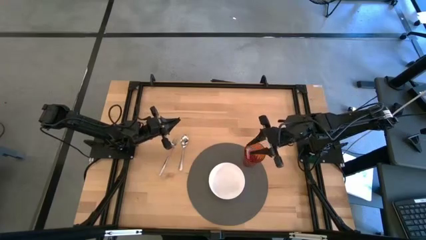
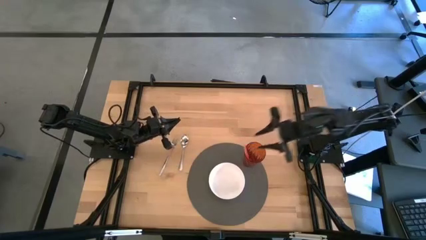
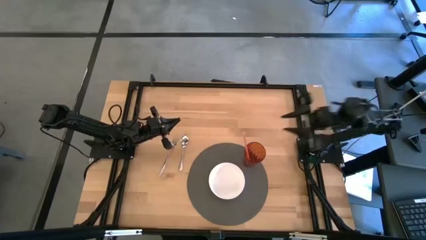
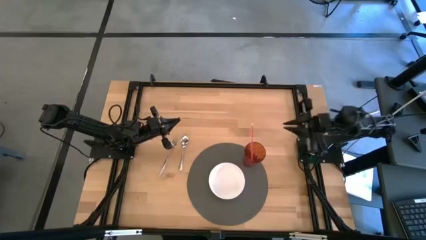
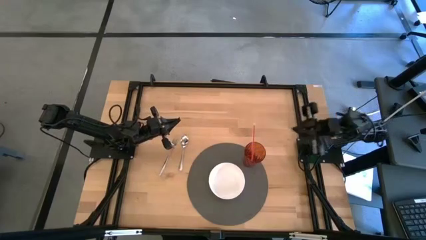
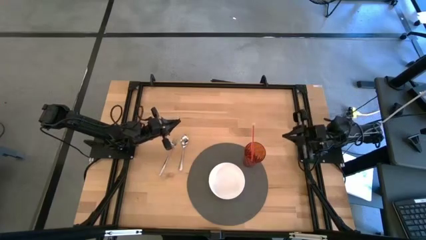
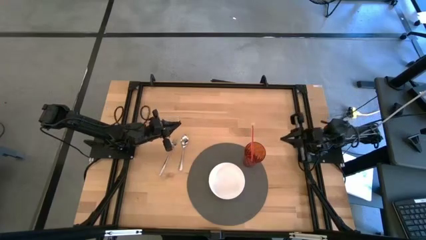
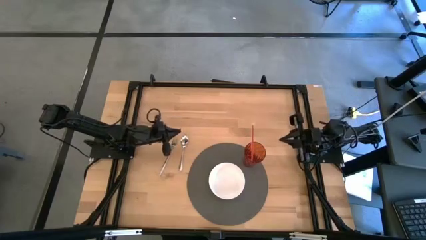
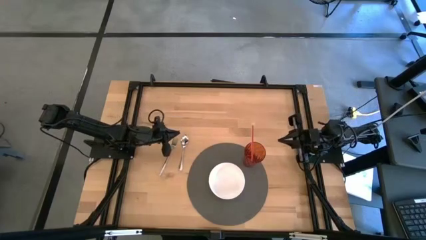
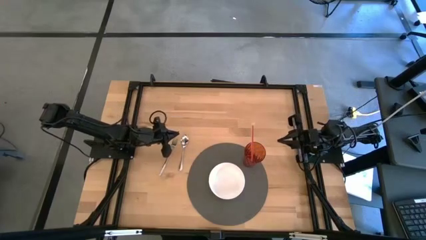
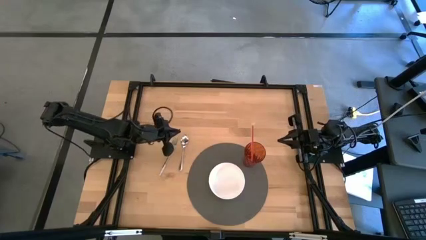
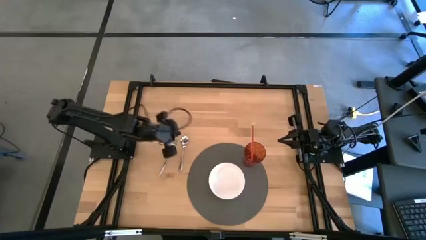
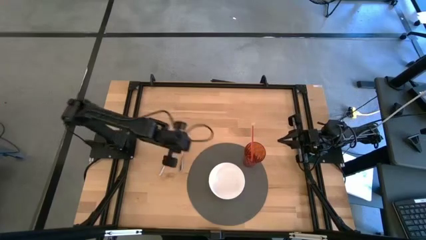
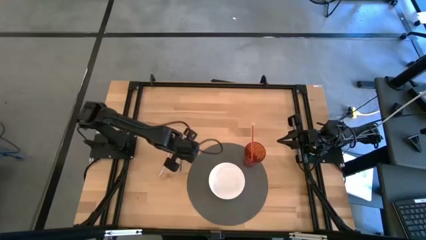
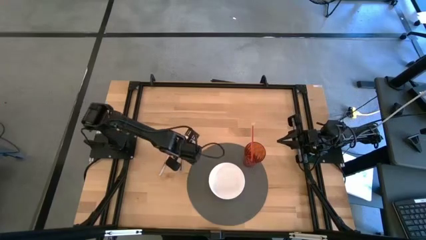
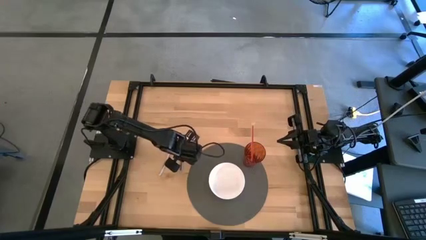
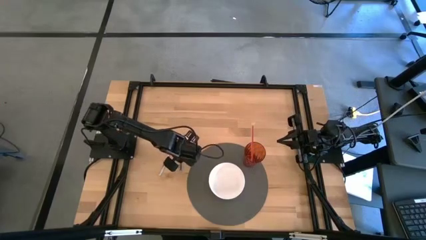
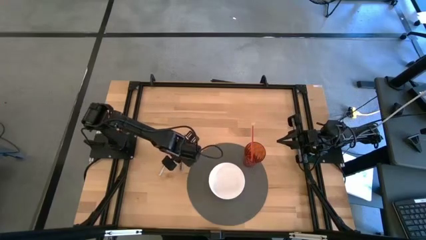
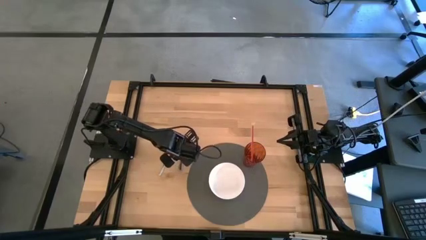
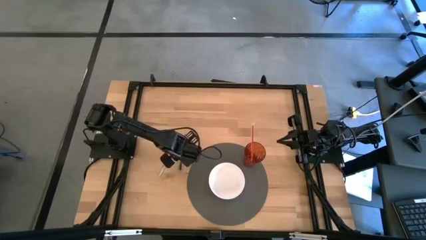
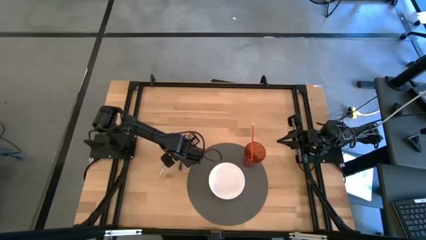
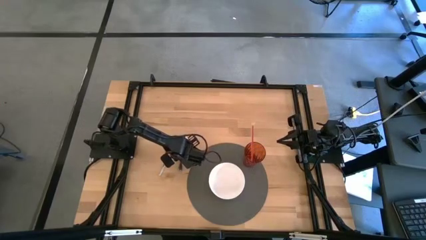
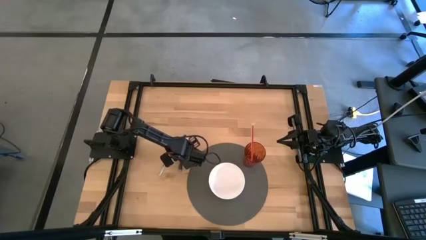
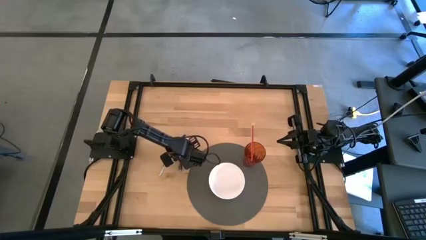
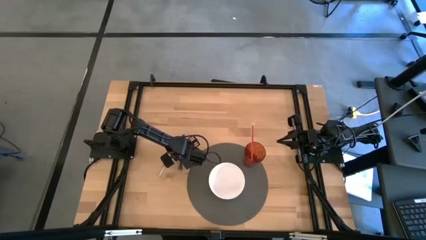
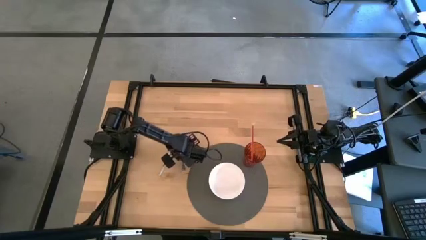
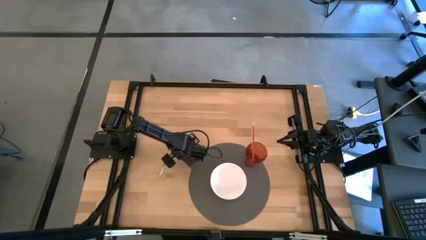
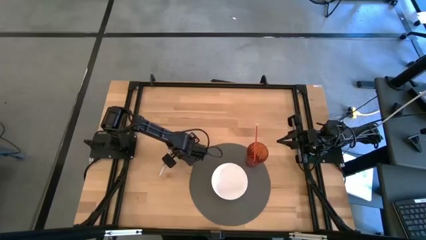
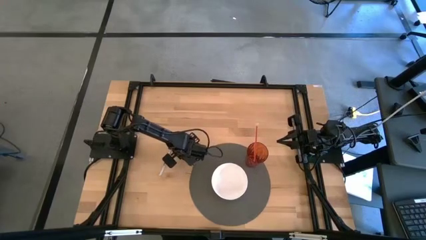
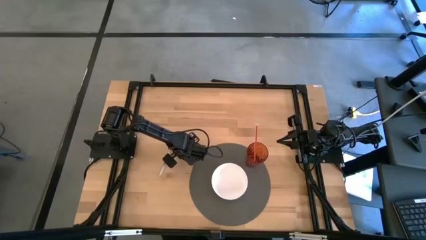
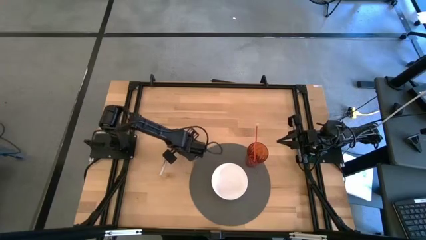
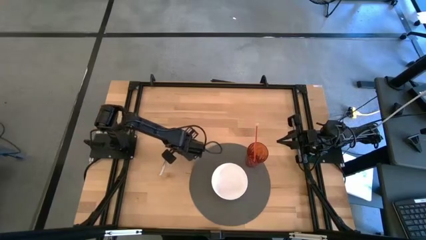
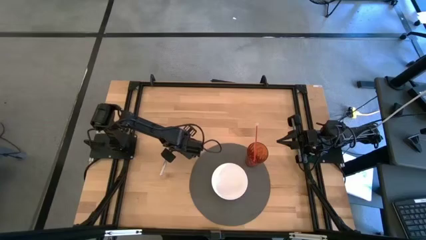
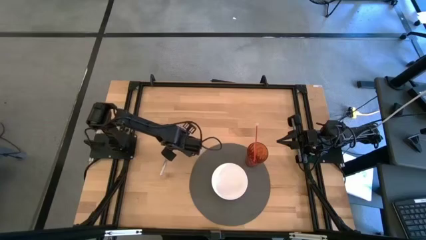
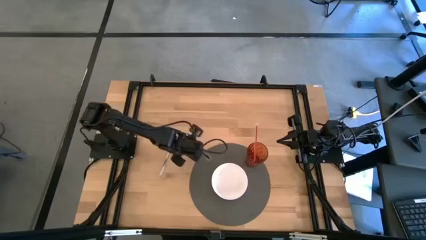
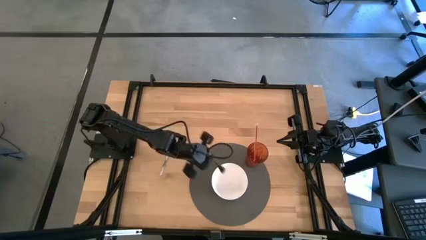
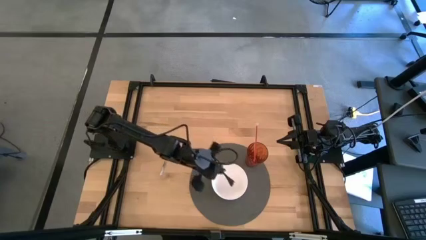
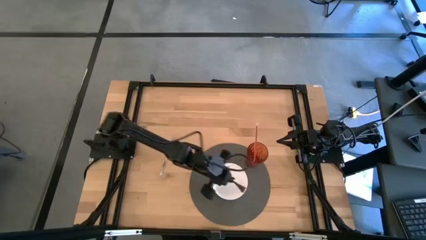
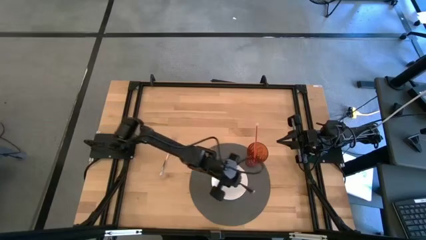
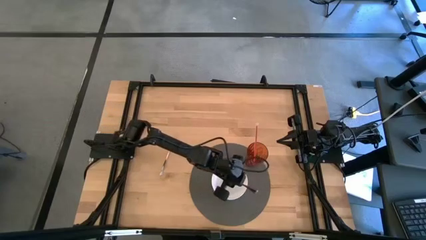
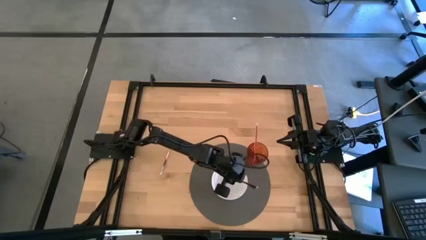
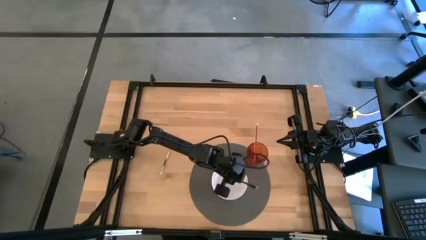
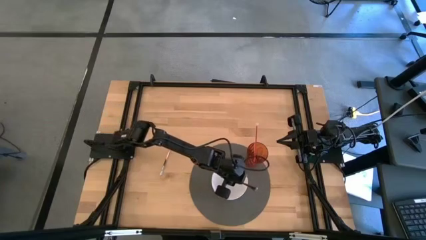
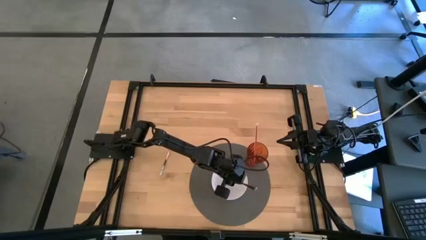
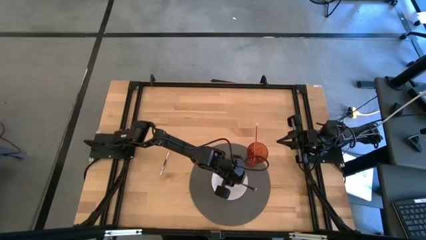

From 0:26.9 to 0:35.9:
Task: Pick & Place Utensil
Put the silver spoon into the bowl on the table mat

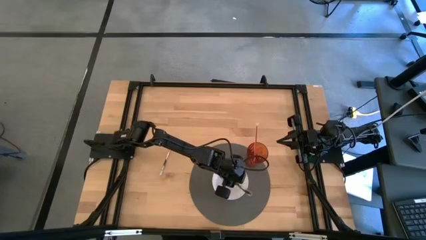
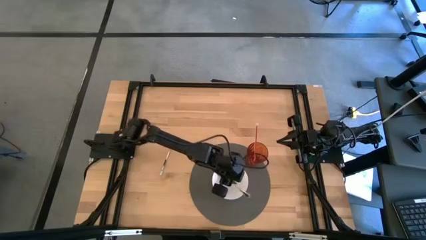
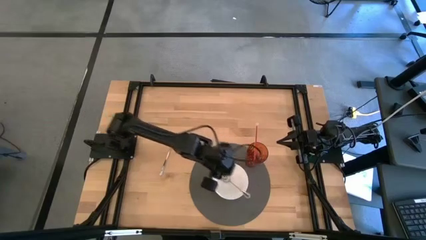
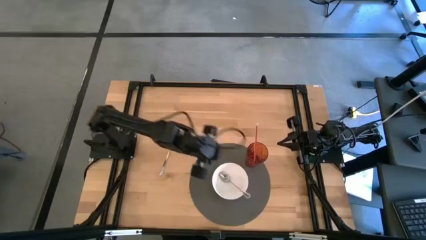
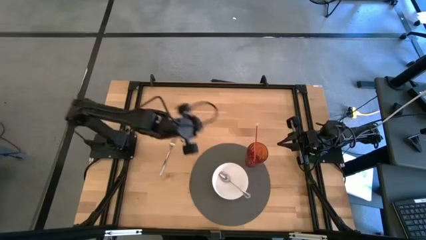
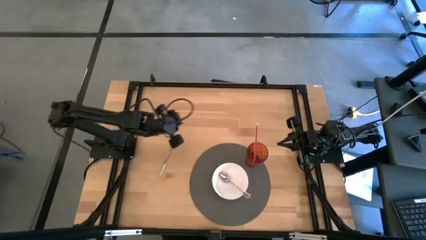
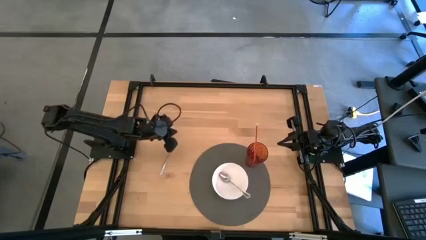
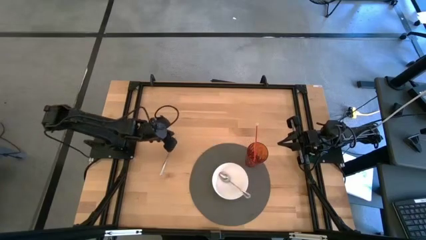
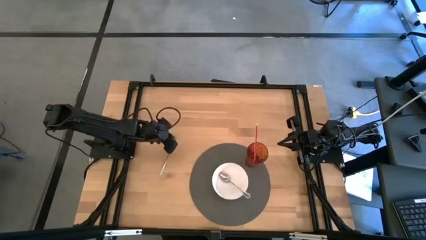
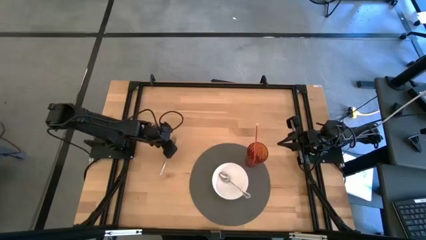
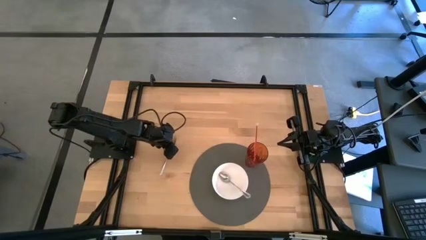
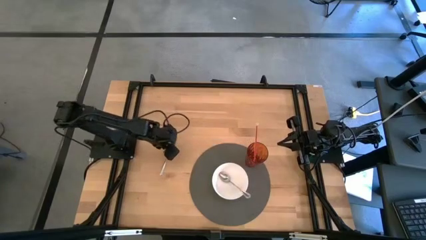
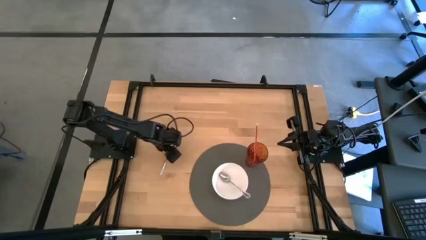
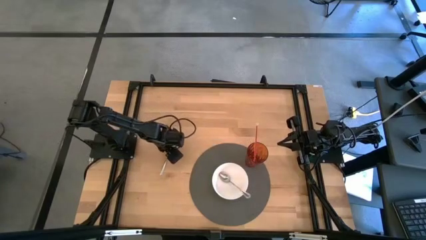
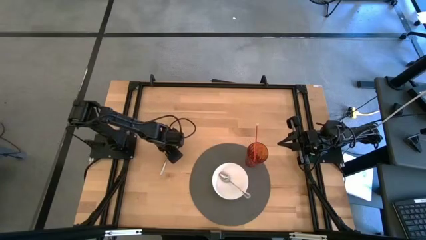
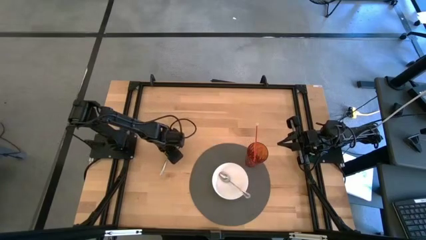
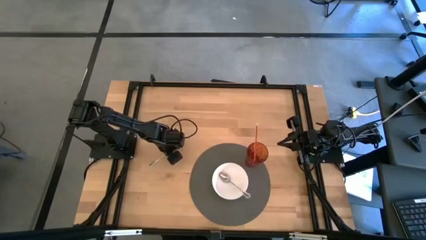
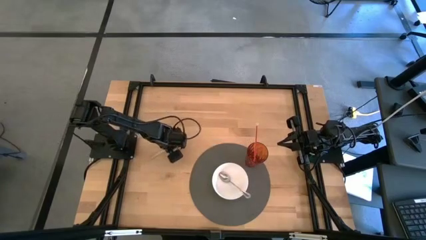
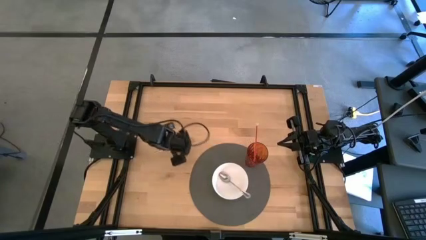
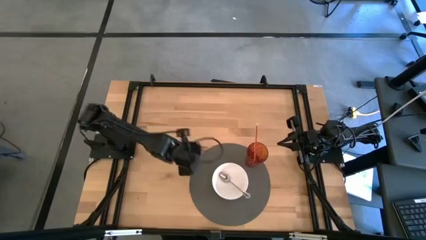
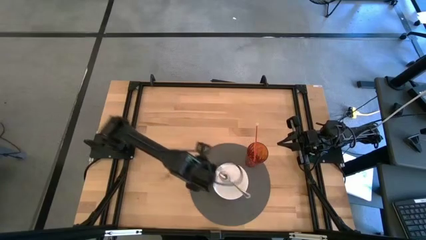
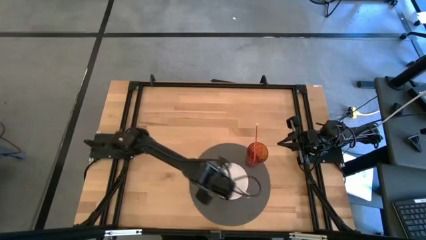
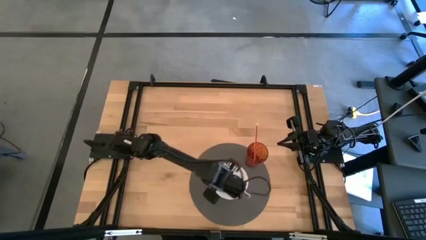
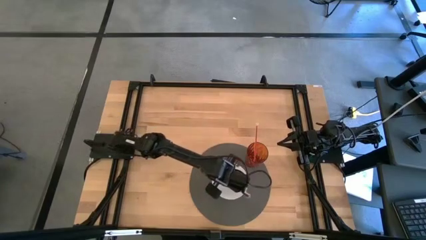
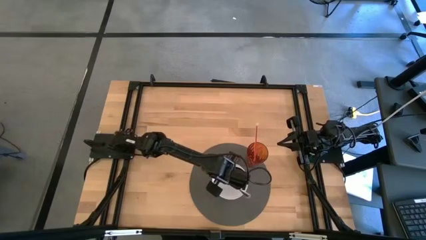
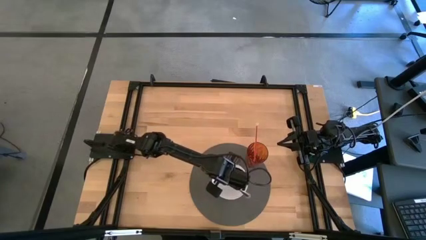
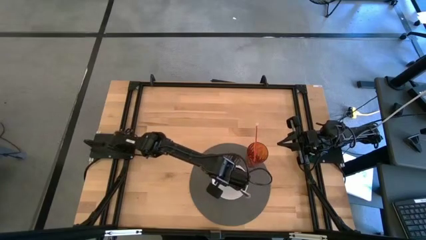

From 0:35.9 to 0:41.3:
Put the silver fork into the bowl on the table mat

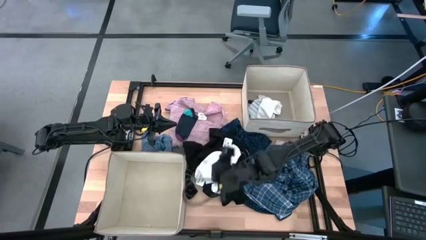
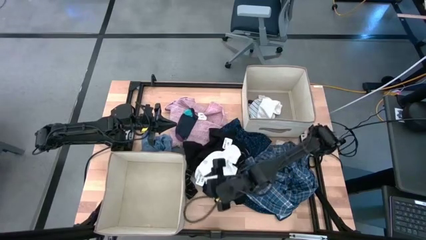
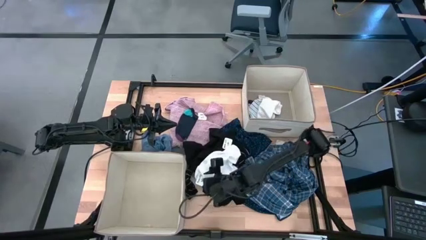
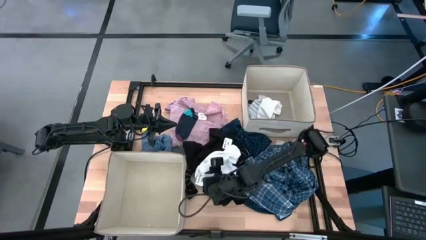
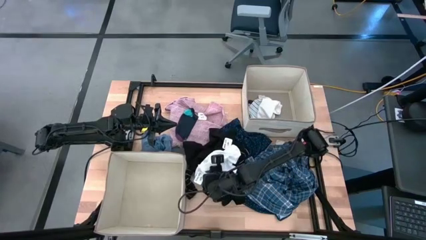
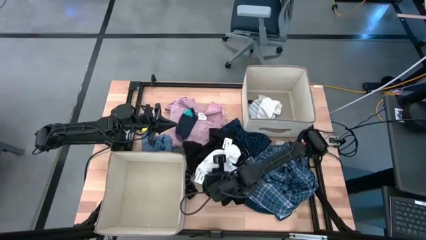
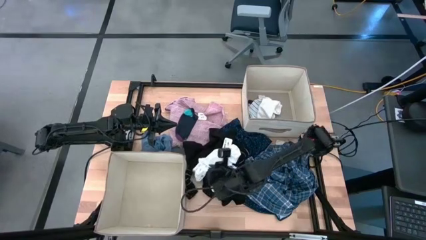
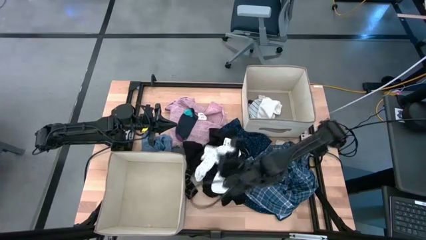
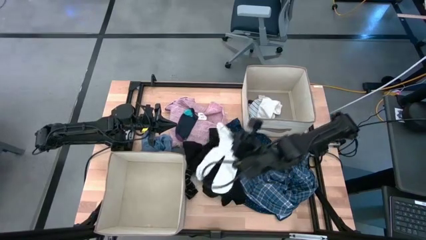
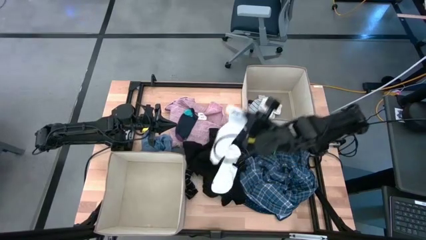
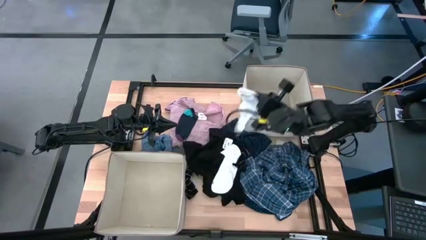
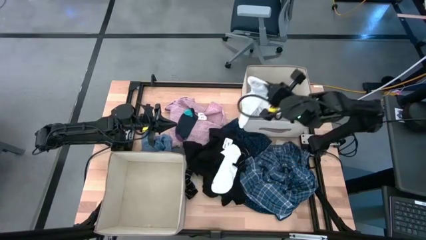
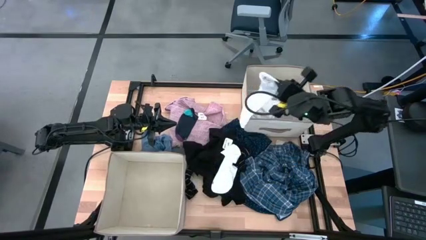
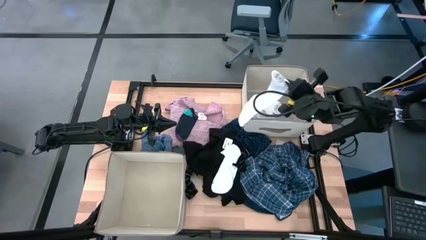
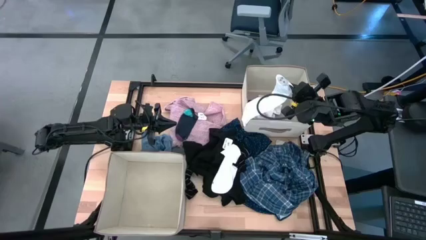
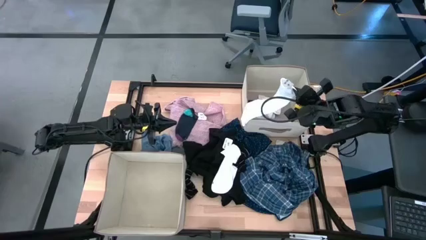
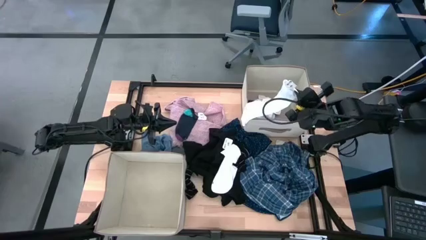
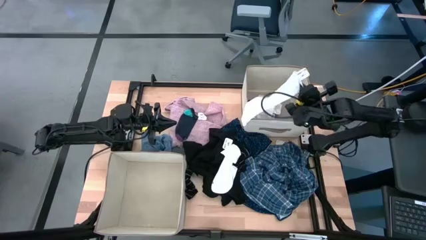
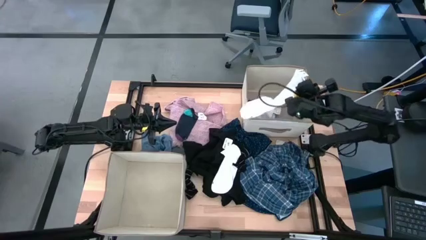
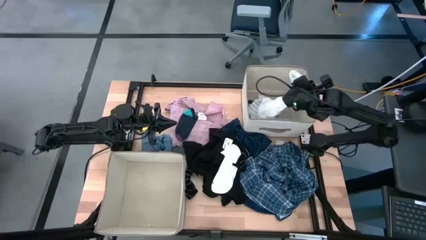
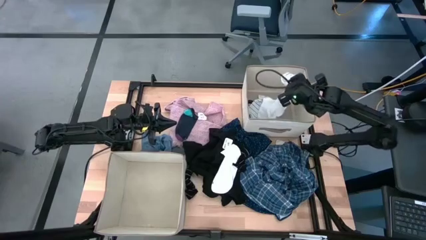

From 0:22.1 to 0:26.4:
Task: Sort clothes
Put the white sock into the top white laundry organizer
